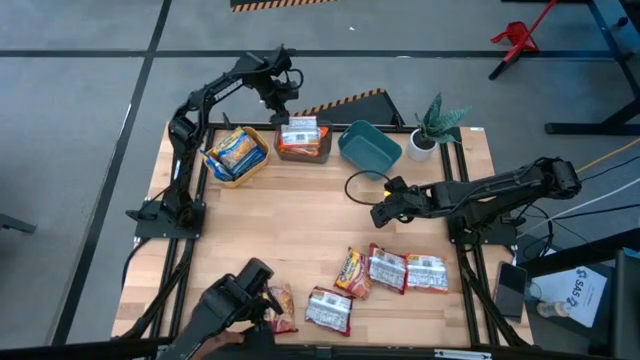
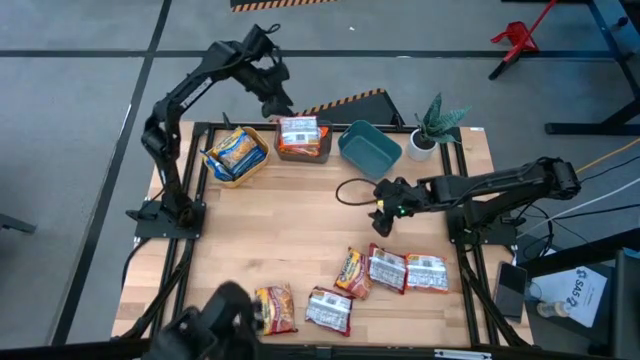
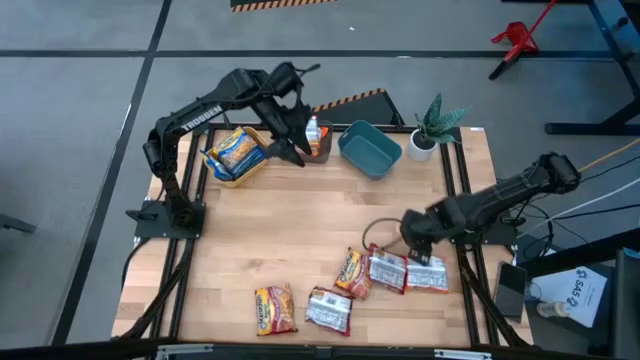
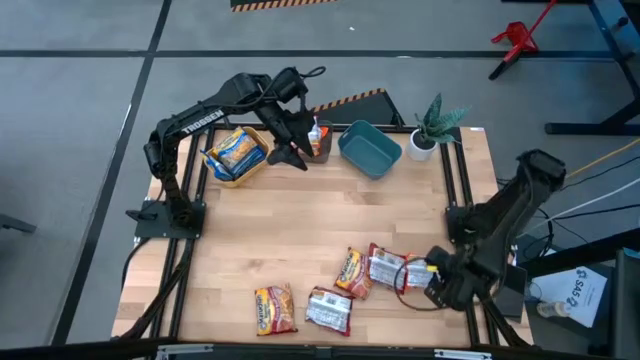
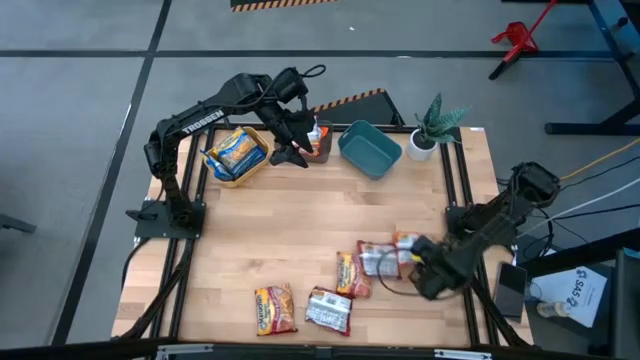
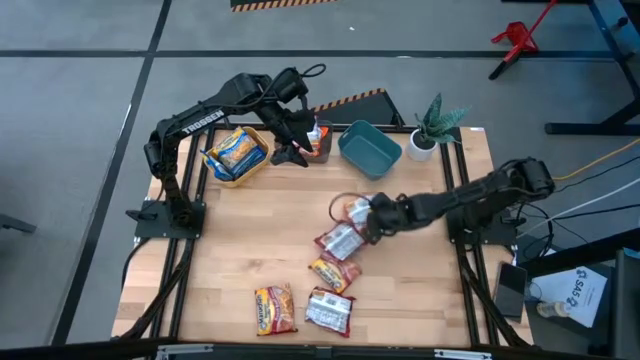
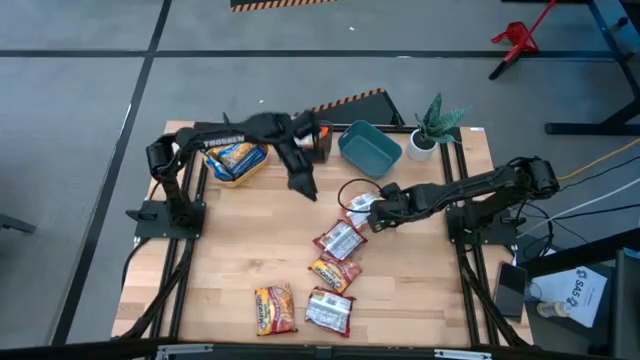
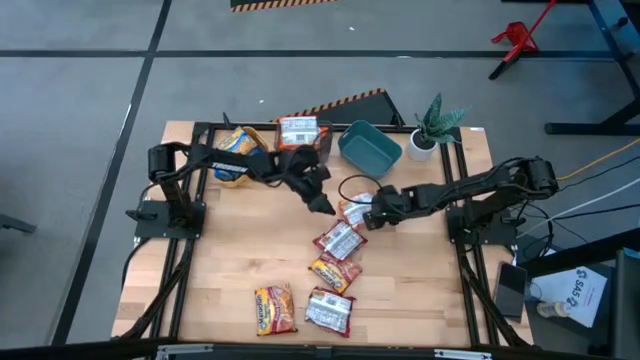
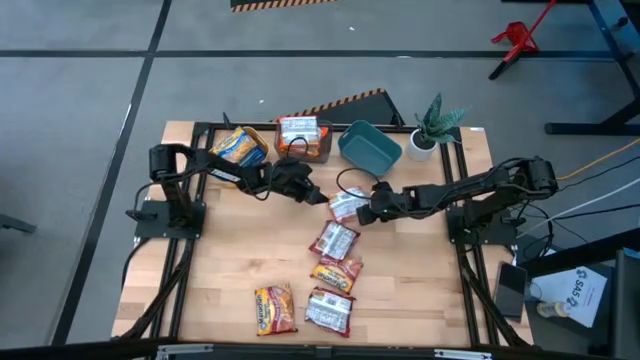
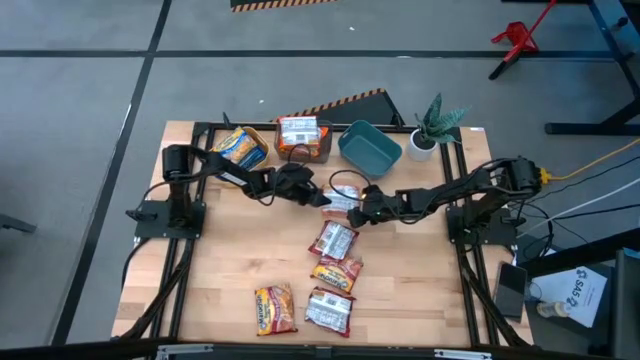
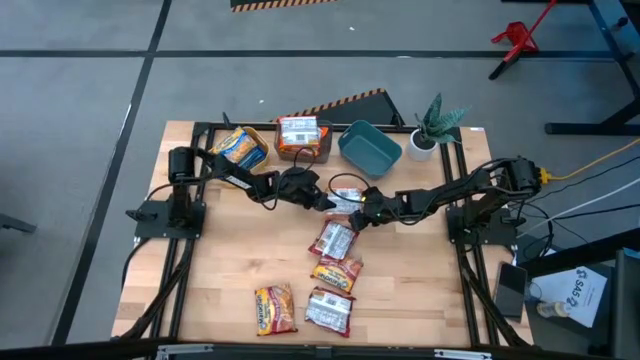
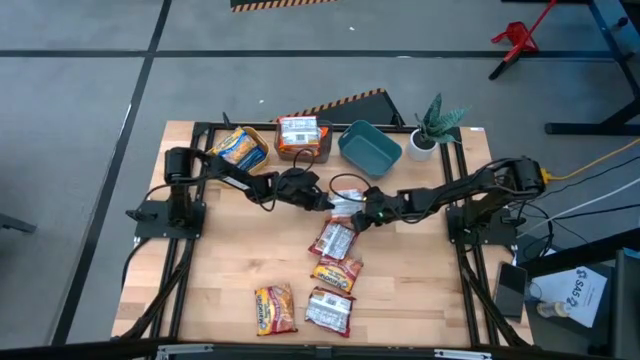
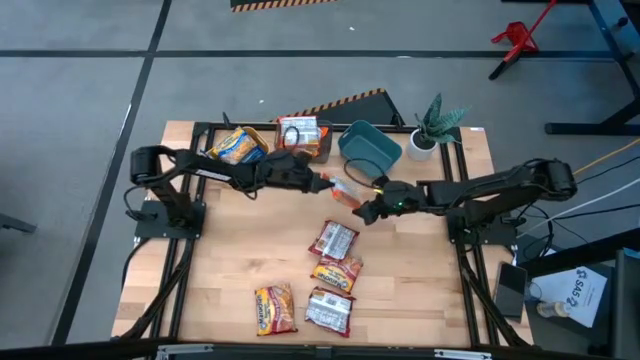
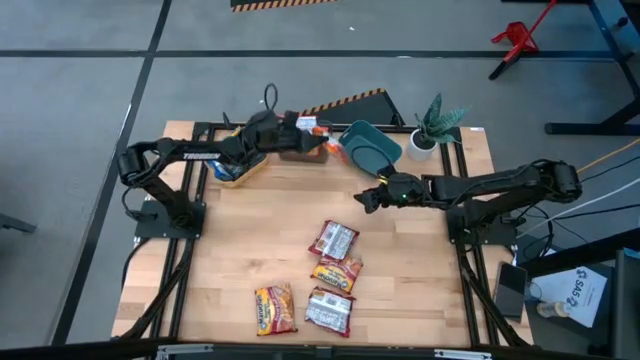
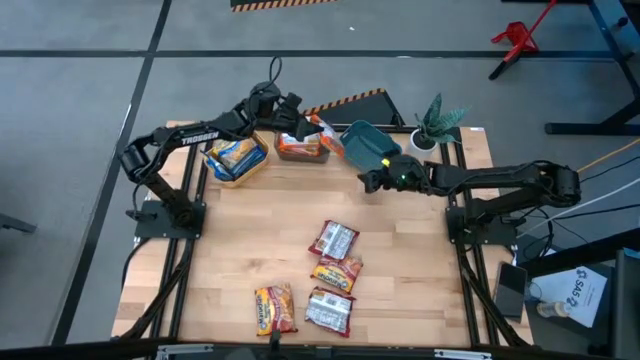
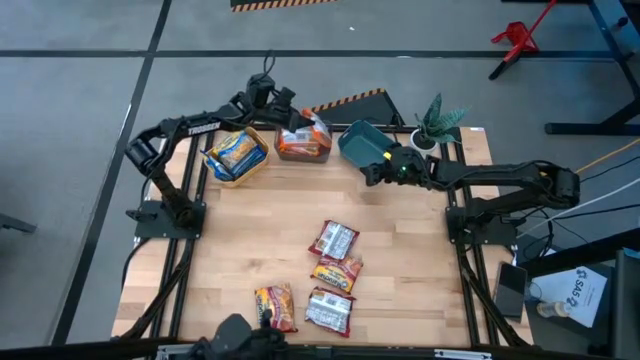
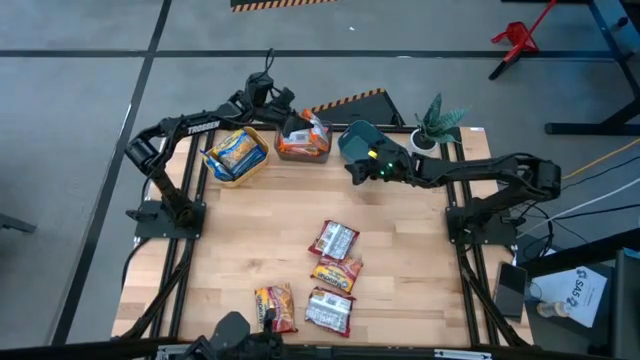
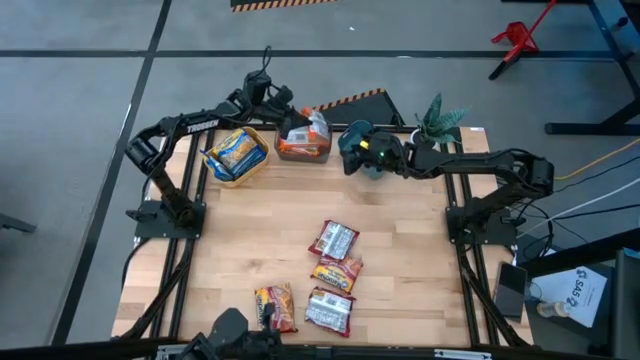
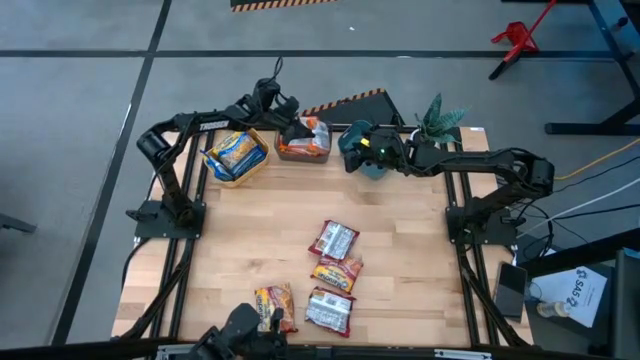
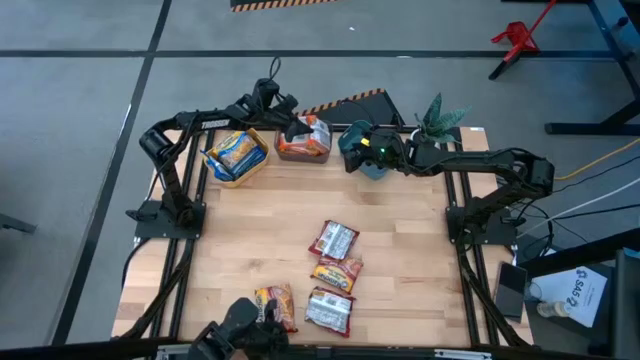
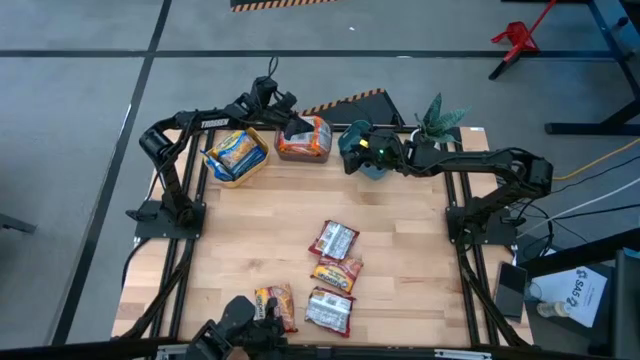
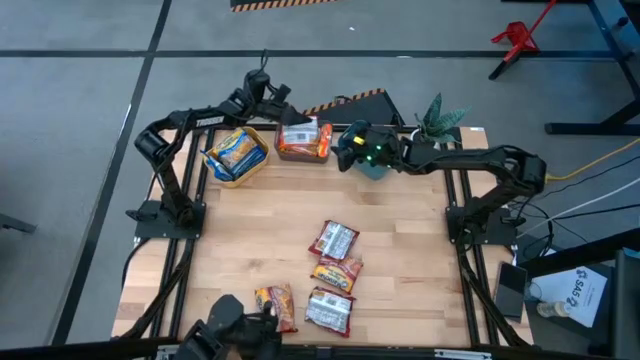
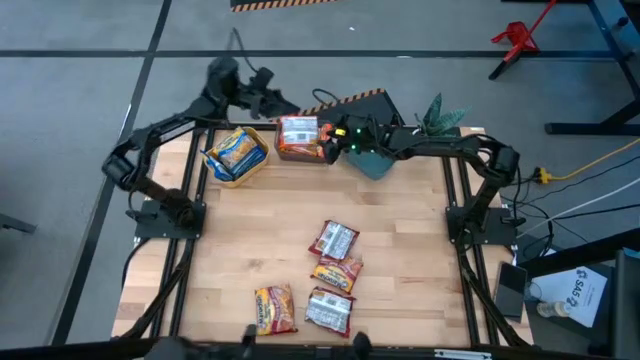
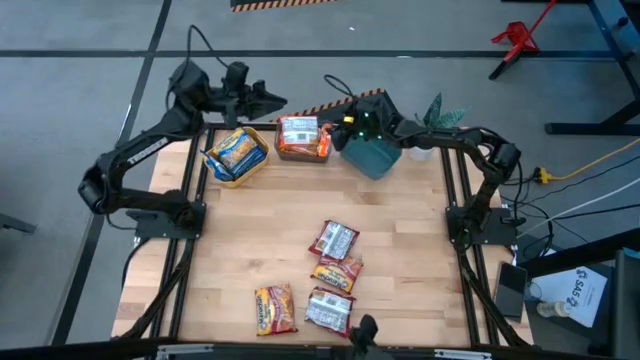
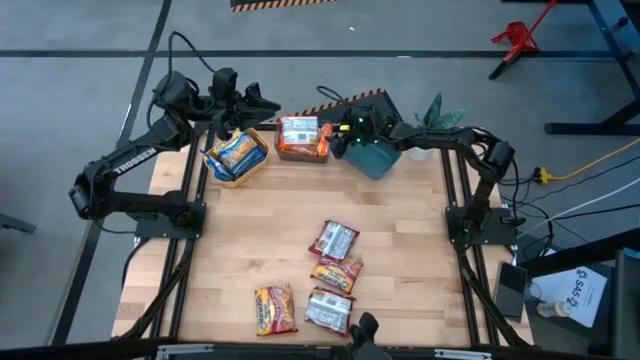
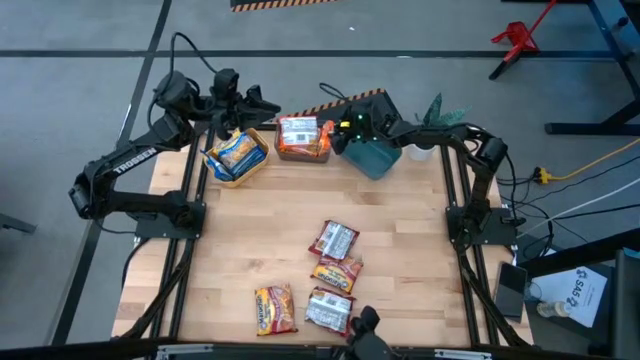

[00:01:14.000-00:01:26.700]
Task: Sort Maruchan noodles
Put the orange noodle pack into the black bin

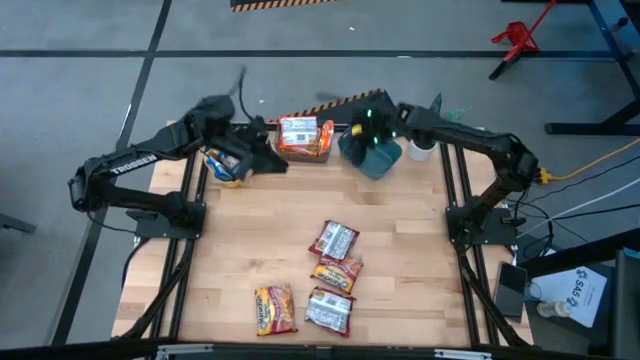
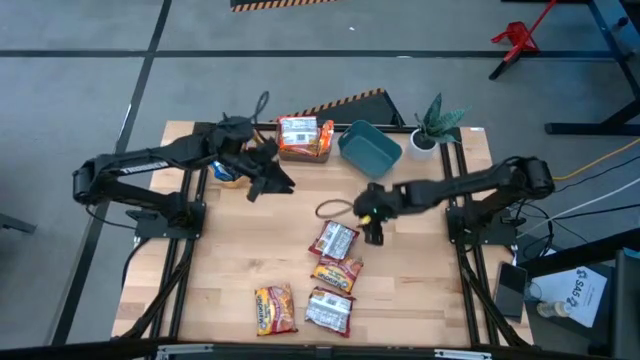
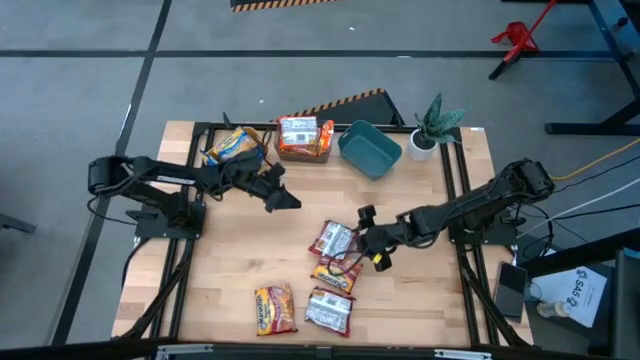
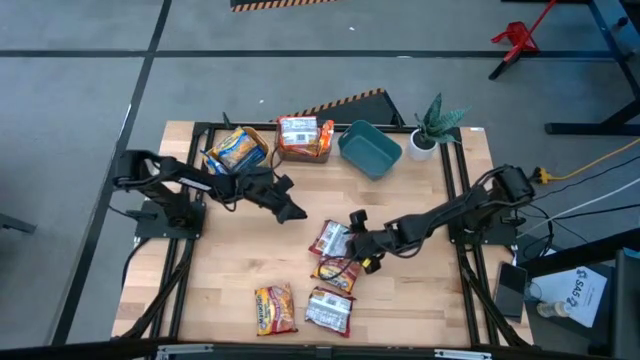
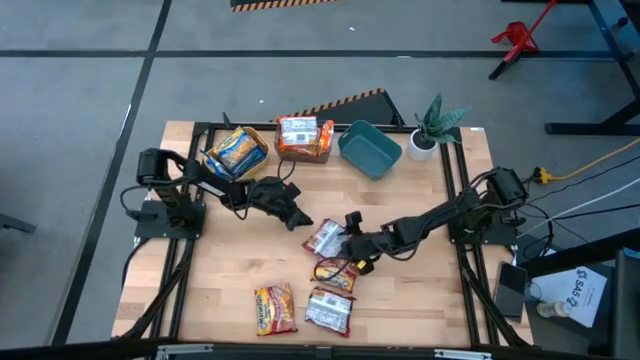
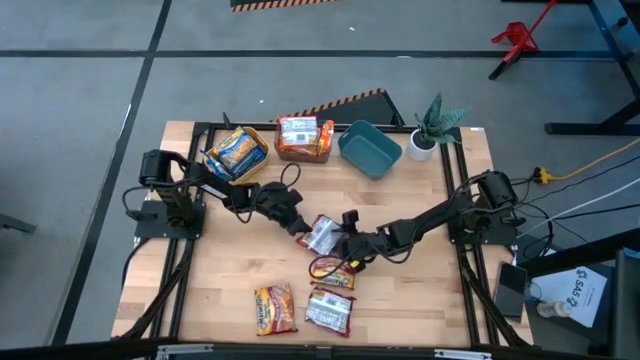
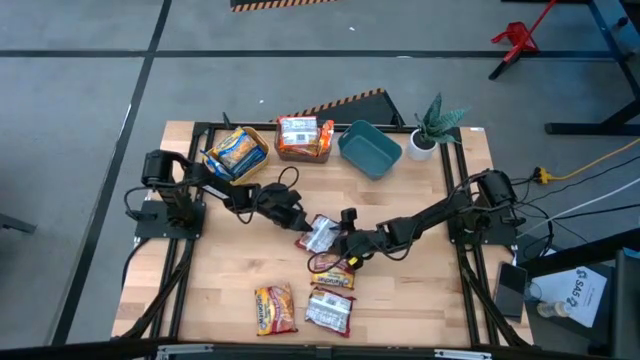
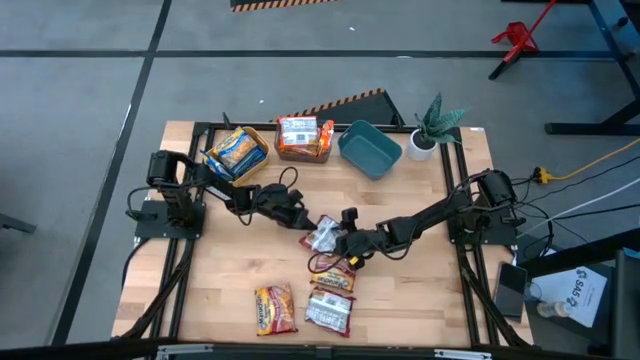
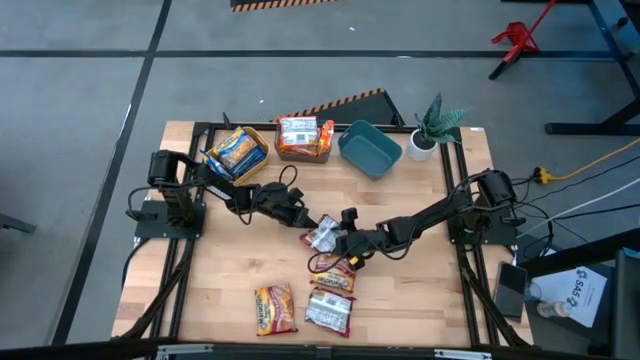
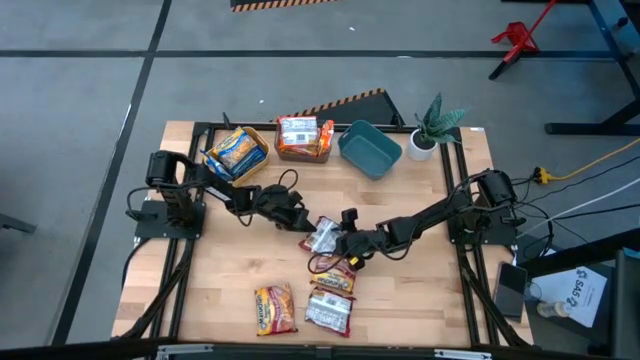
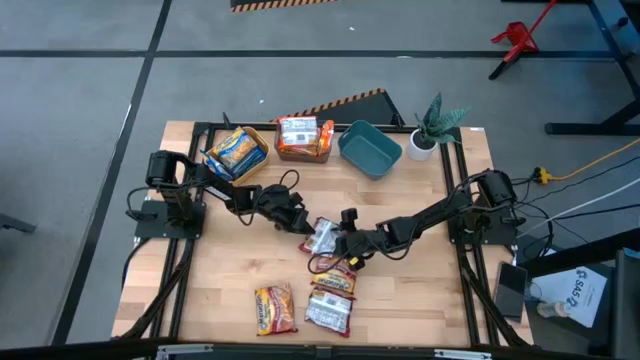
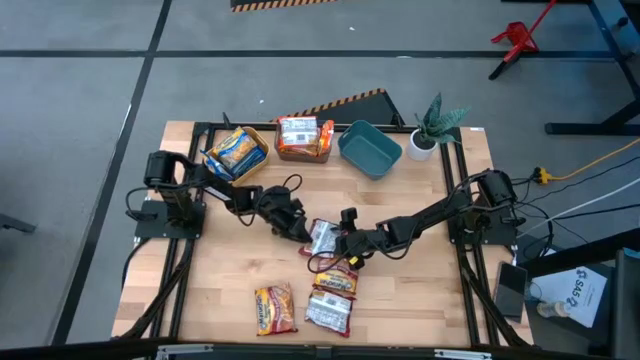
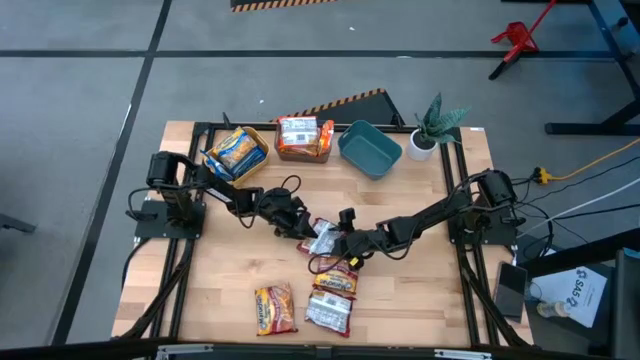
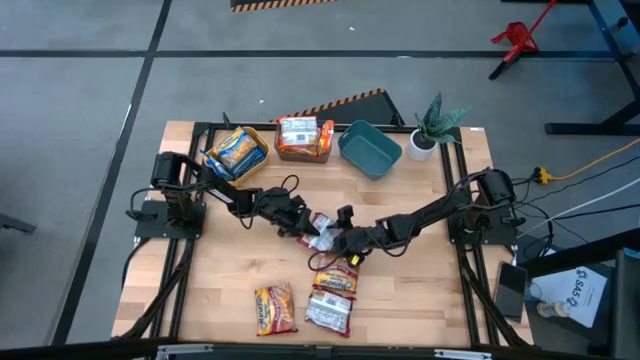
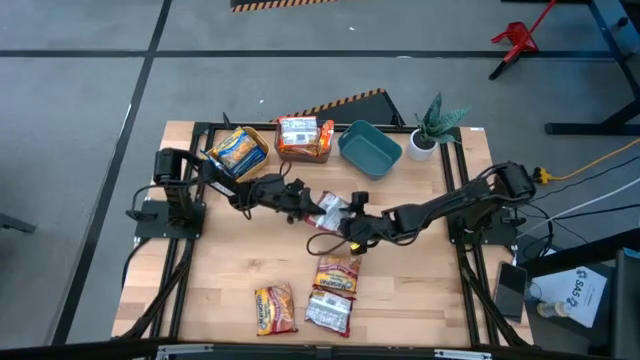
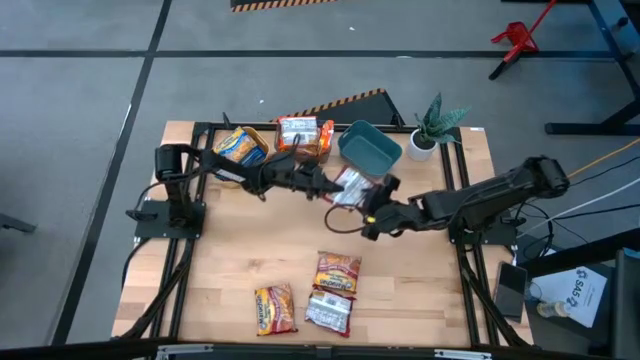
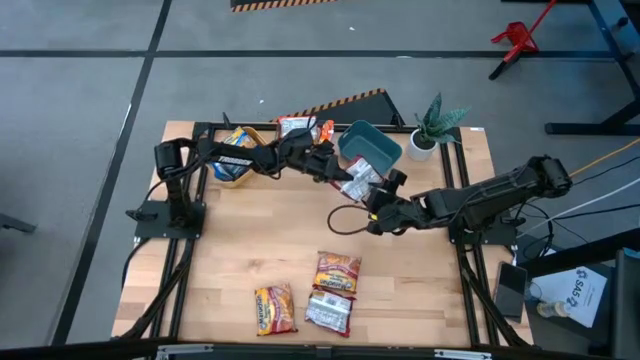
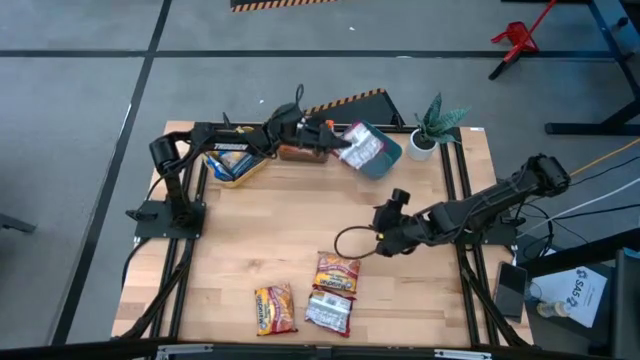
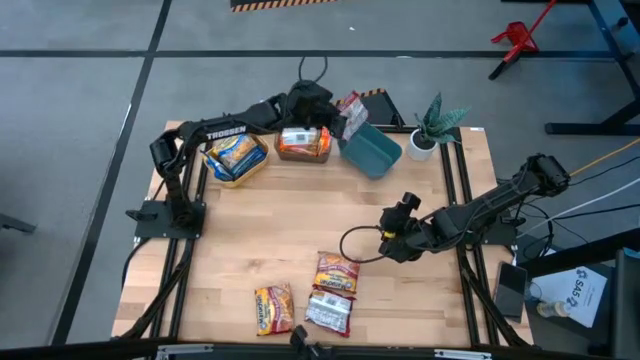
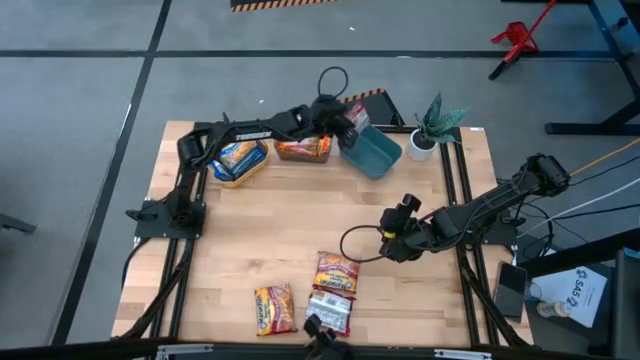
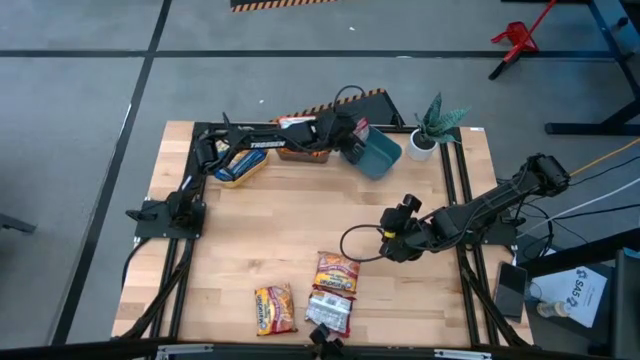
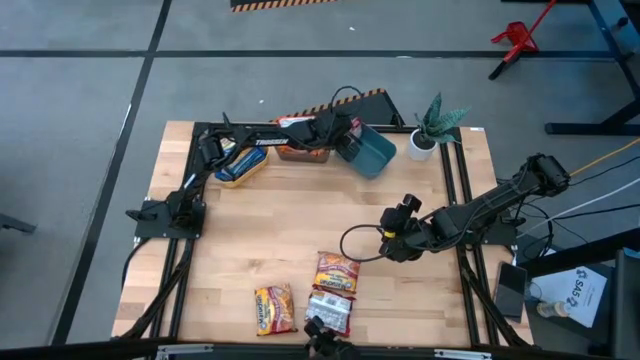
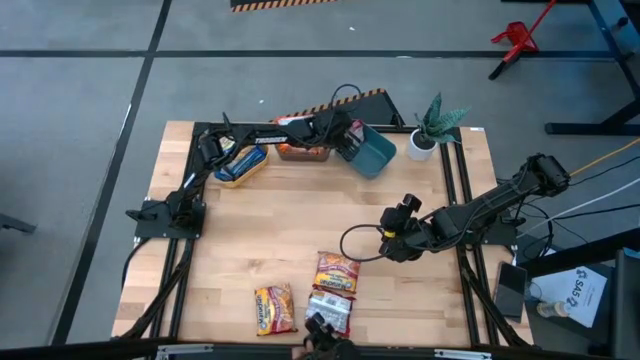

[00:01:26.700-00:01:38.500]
Put the red noodle pack into the blue bin
